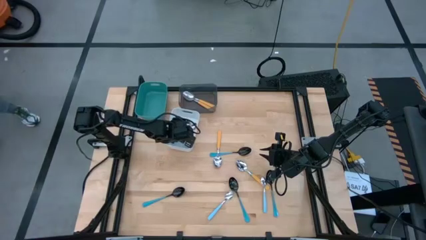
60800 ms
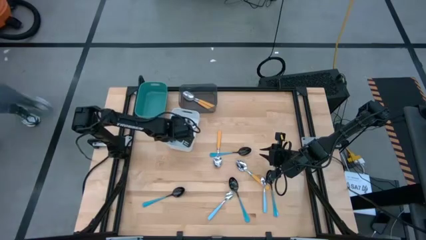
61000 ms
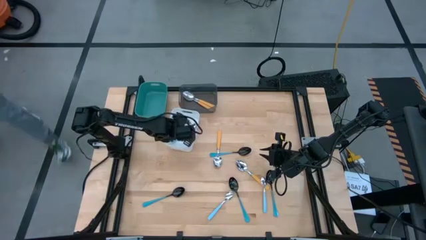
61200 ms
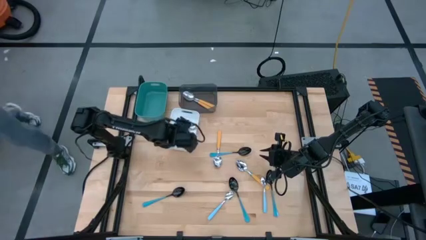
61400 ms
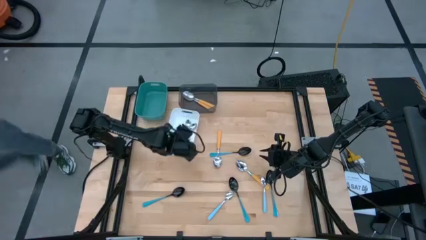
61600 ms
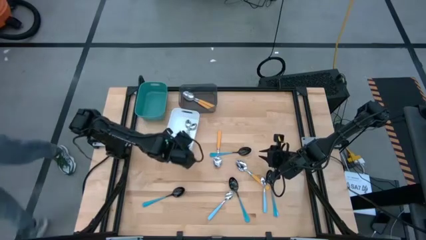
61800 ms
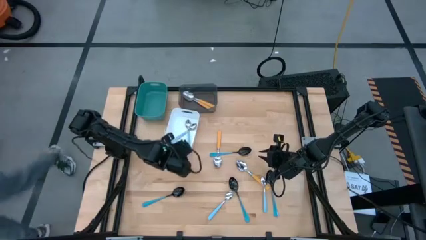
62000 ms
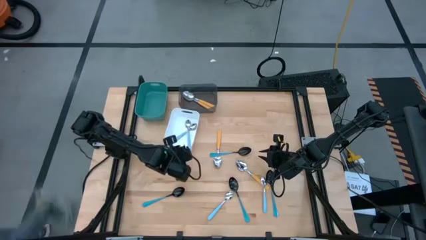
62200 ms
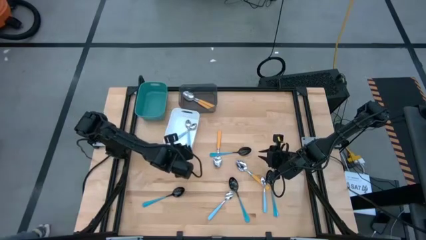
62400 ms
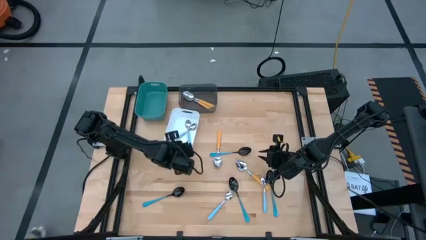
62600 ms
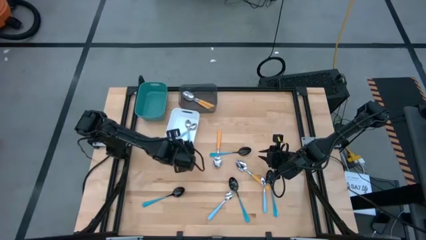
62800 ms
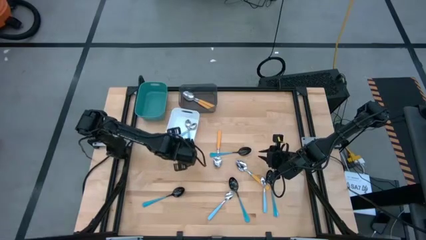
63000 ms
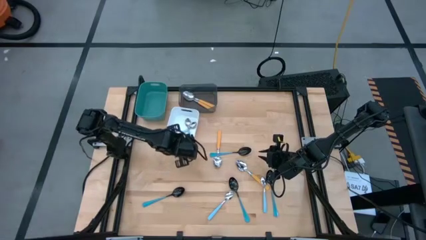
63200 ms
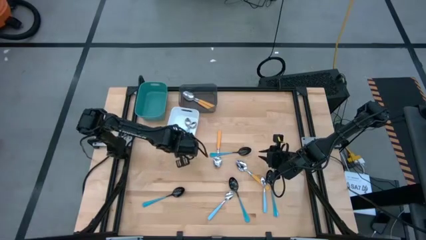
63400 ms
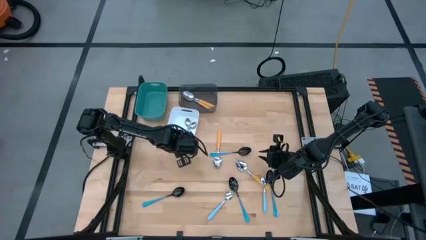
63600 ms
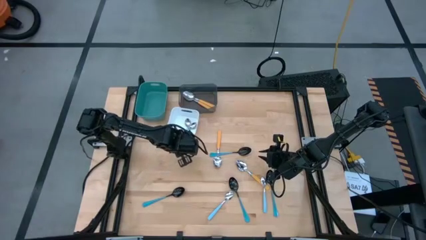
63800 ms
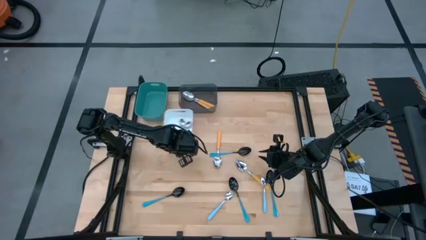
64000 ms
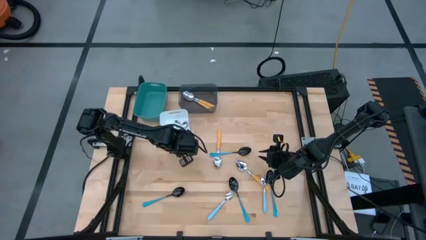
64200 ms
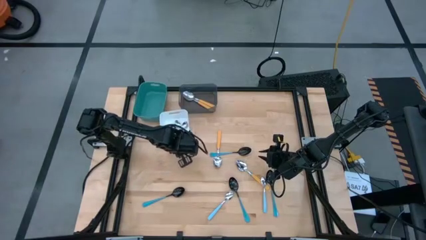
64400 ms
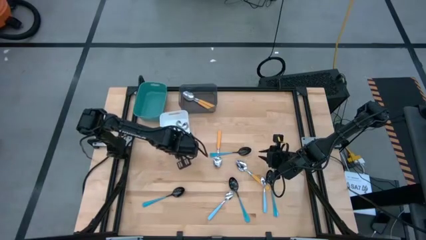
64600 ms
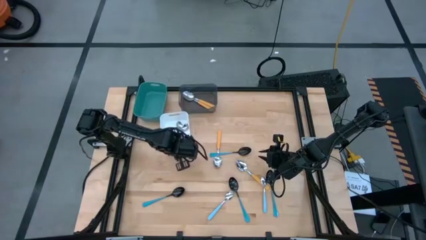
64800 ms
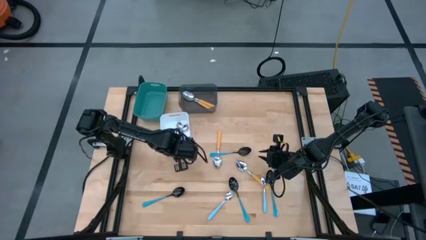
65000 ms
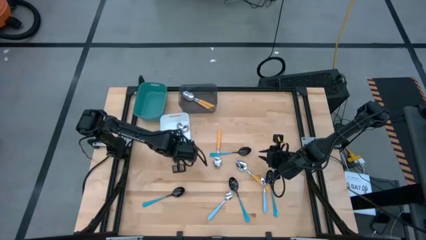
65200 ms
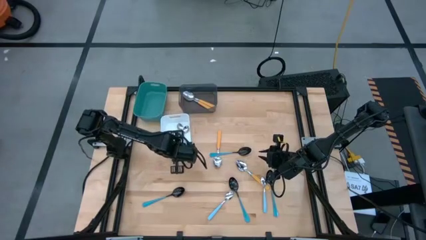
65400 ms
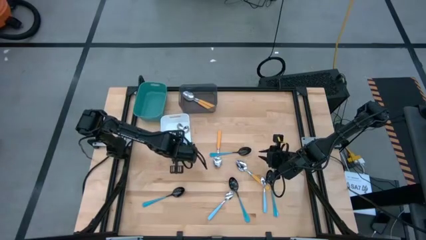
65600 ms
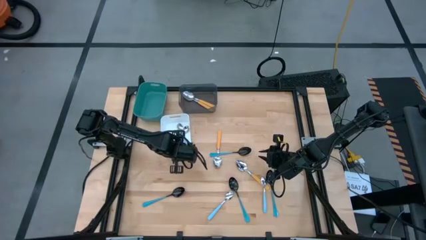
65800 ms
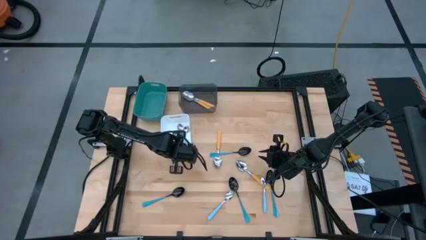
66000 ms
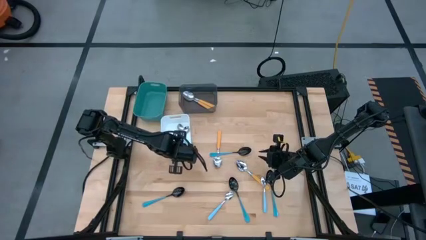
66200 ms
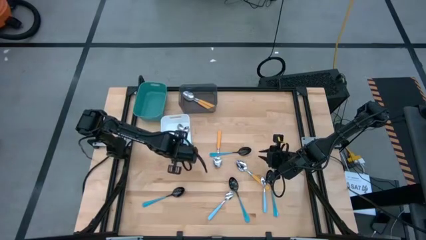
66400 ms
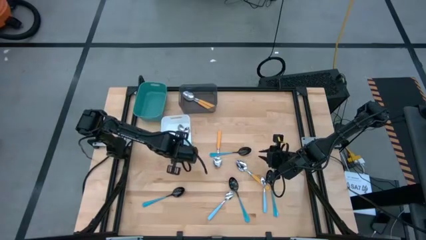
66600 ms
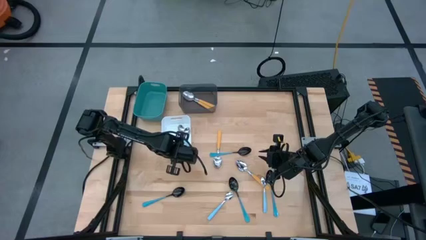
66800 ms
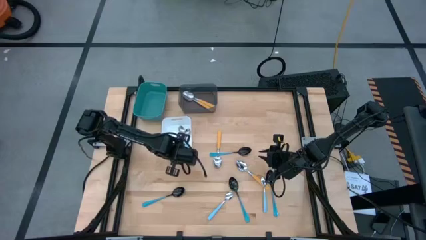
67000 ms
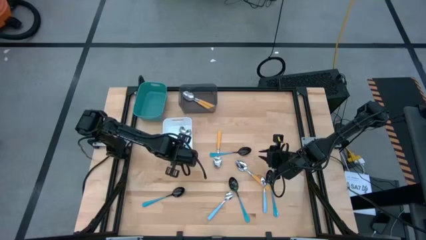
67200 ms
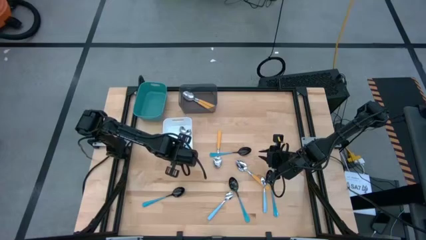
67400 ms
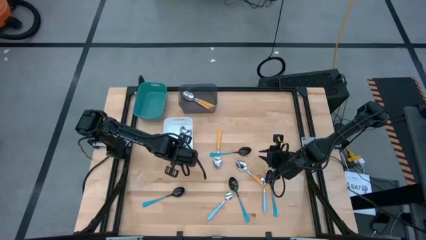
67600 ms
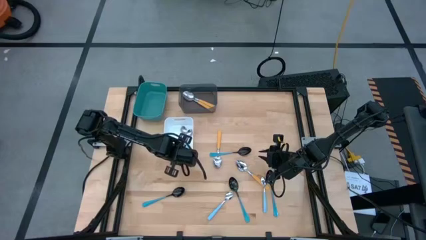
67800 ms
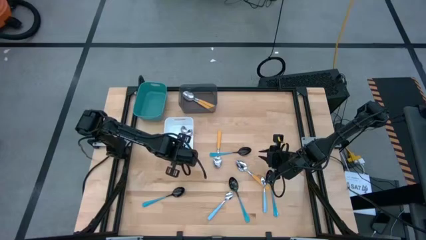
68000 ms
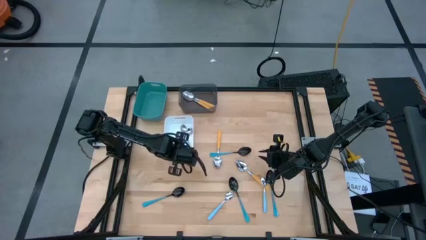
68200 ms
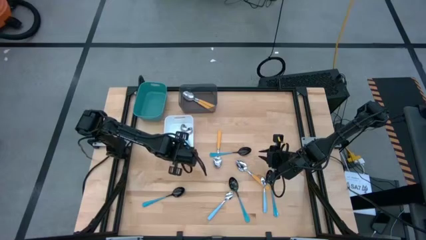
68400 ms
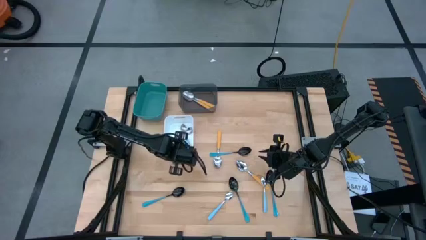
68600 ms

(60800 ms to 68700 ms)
Task: Sort silverware by color (type)
Adjust the white bin

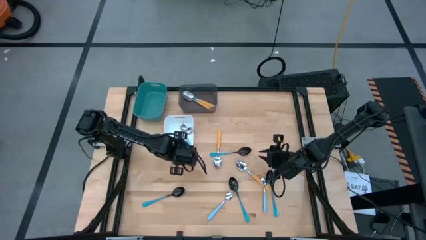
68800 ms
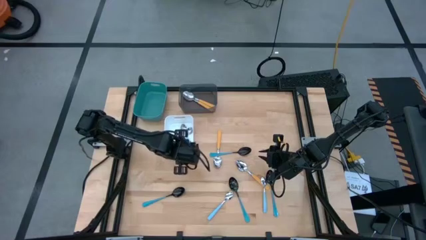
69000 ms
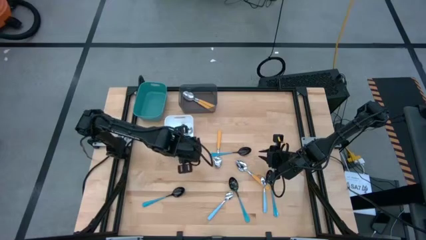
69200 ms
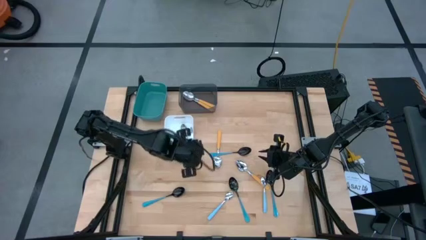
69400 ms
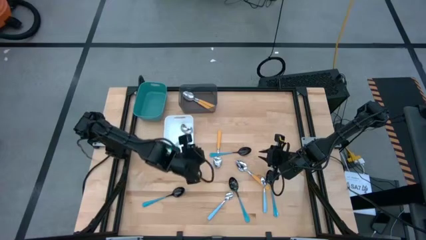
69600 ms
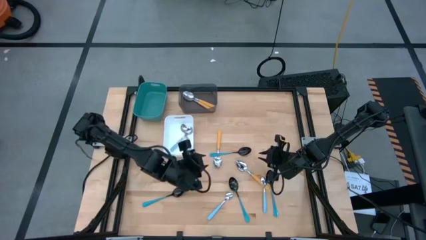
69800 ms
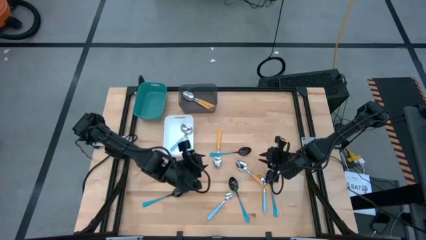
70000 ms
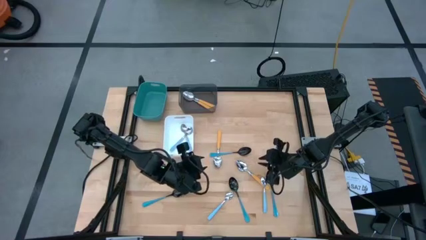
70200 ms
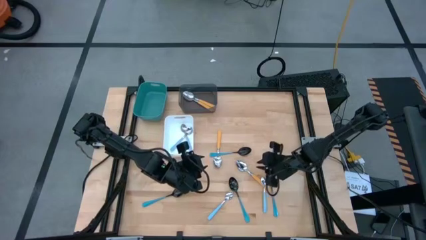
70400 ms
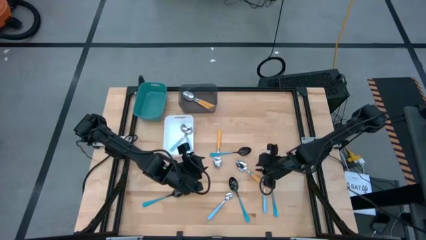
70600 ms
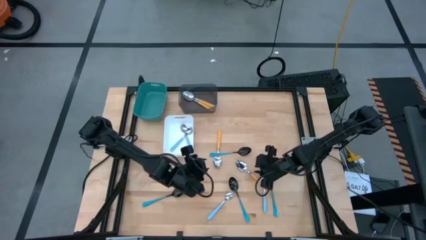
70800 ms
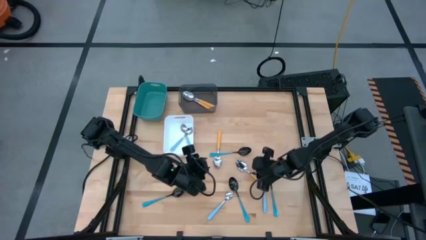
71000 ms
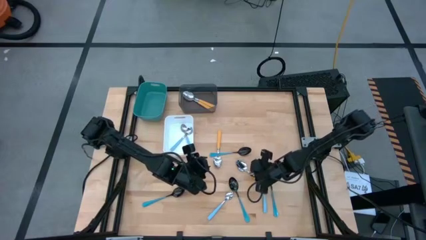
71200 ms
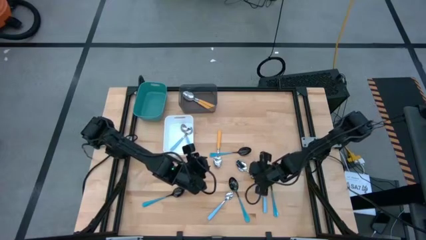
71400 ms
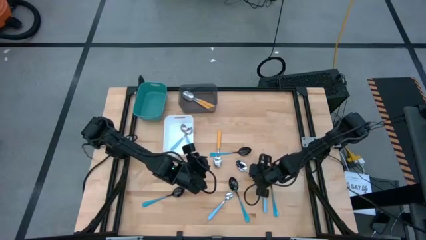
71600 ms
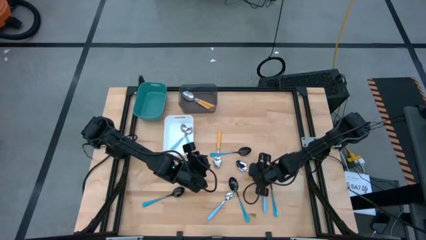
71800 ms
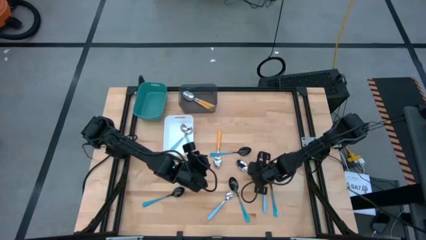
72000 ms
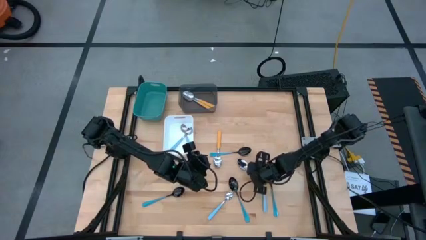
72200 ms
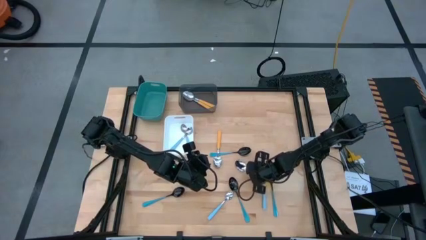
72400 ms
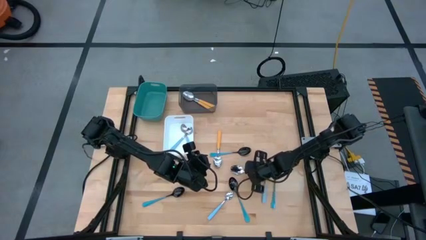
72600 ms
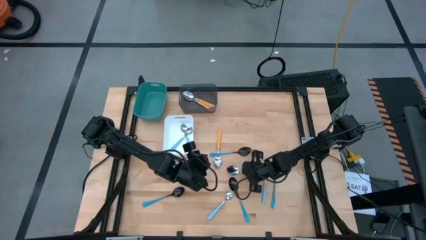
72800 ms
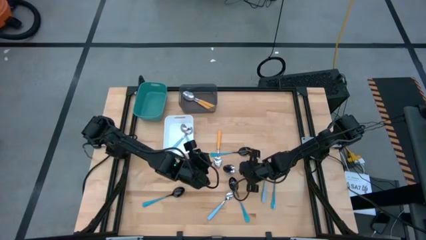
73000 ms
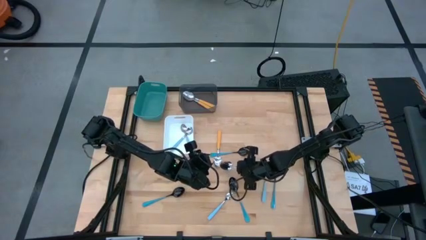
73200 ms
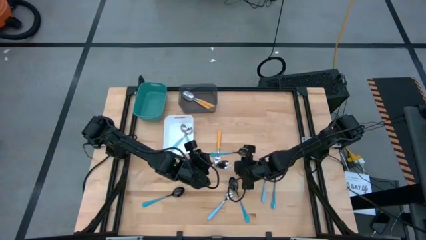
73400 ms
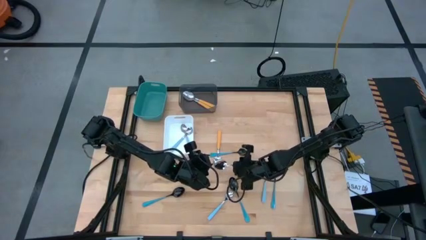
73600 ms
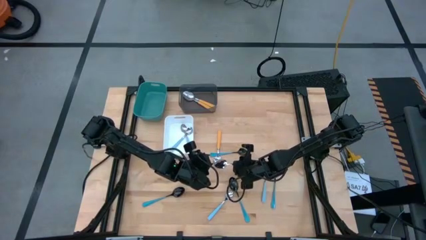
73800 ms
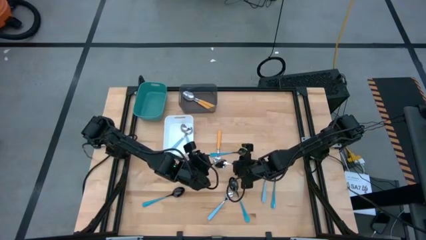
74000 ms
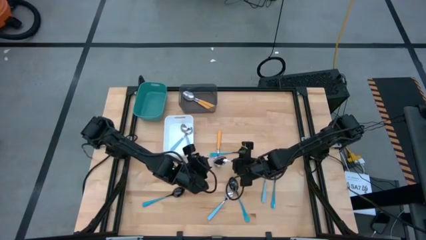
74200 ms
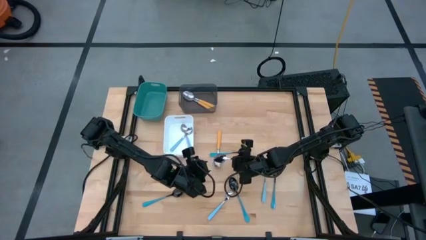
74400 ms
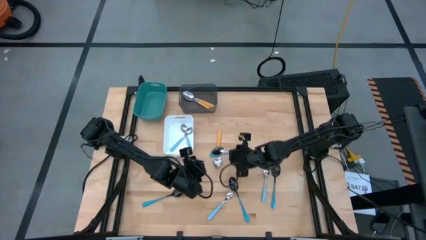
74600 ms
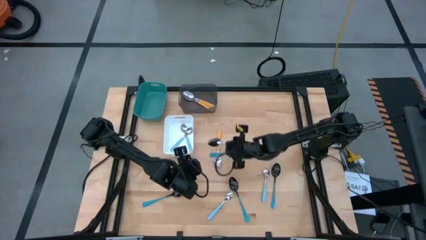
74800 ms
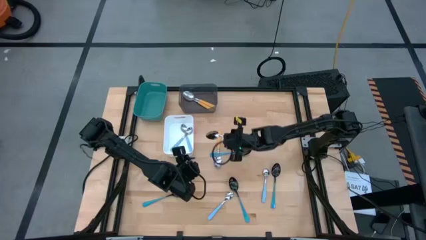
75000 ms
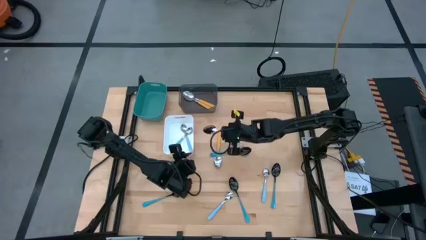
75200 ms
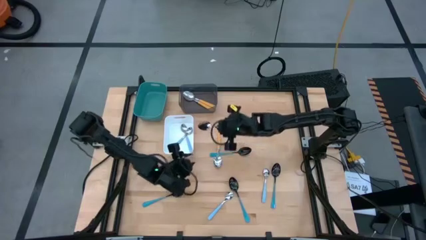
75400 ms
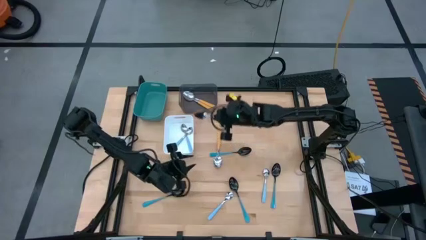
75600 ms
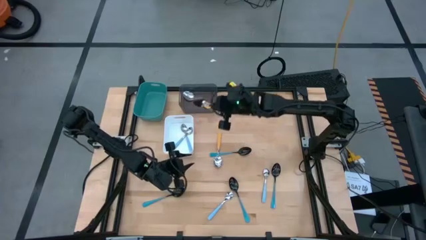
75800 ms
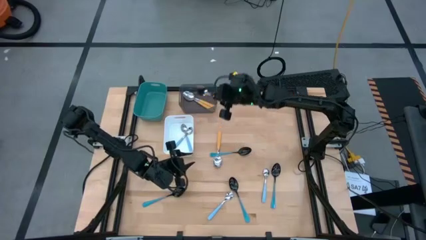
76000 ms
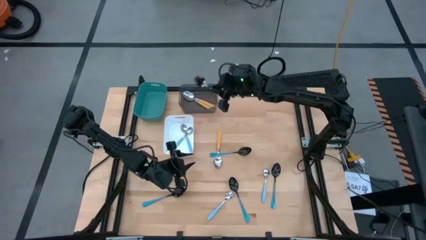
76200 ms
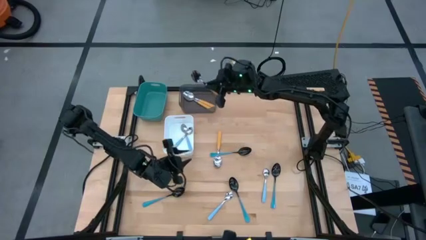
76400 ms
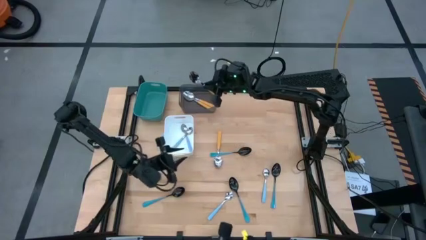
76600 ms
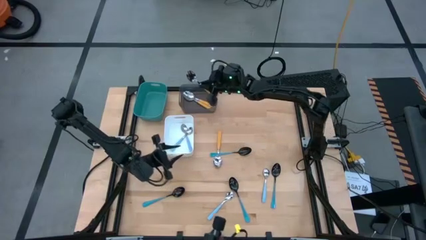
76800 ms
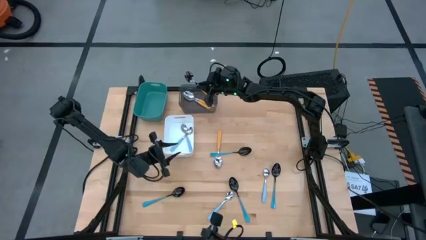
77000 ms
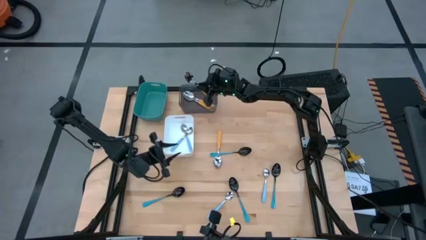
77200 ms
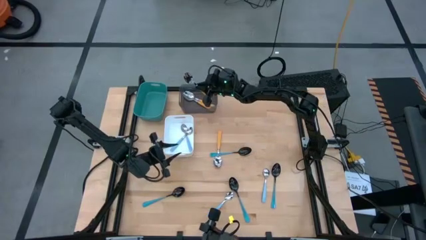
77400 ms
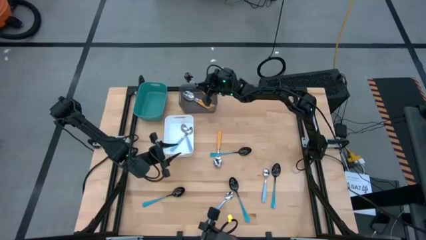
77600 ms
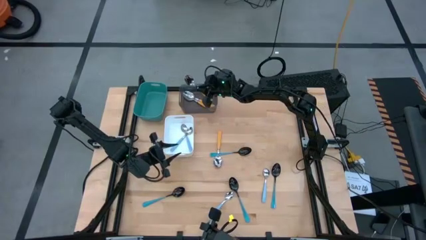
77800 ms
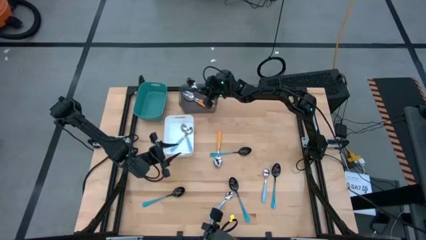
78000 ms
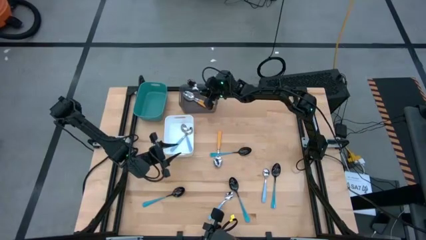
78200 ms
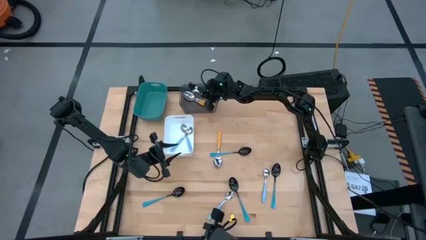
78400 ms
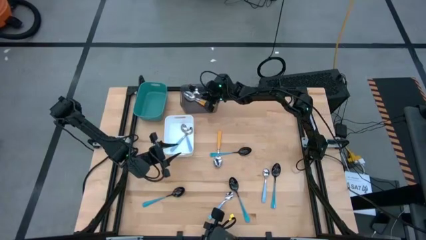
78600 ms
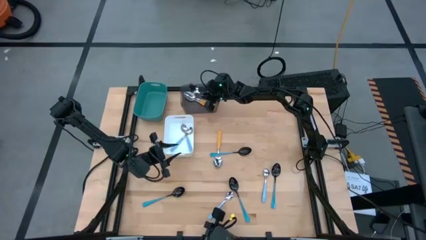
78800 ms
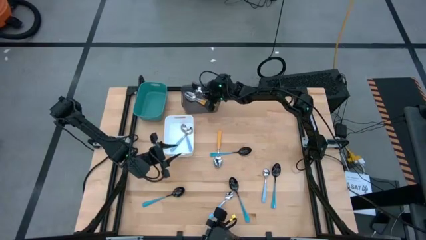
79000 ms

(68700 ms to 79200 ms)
Put the right orange spoon into the black bin
